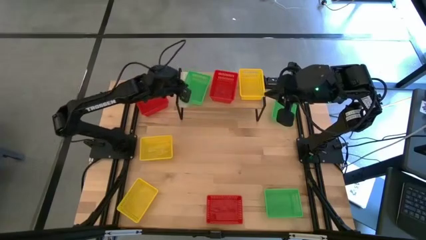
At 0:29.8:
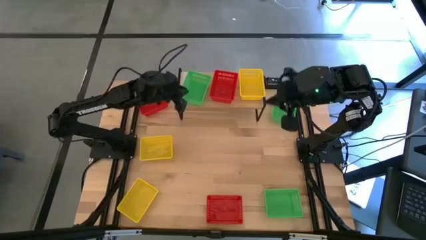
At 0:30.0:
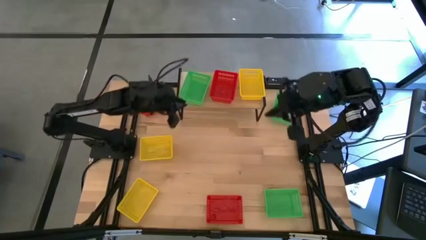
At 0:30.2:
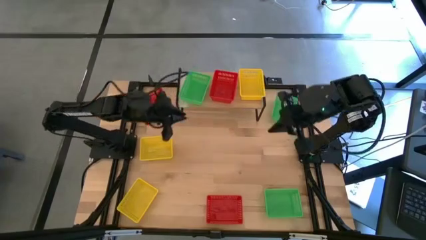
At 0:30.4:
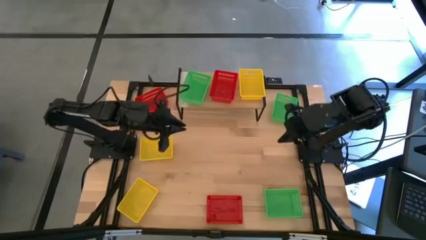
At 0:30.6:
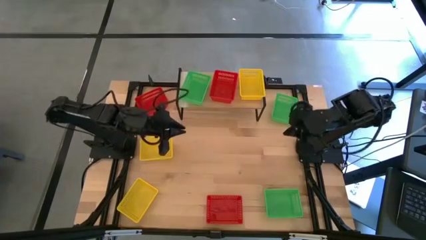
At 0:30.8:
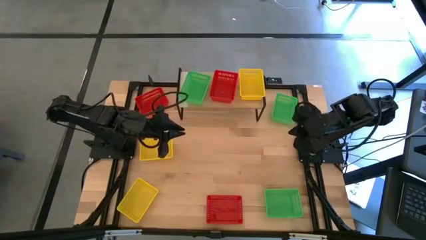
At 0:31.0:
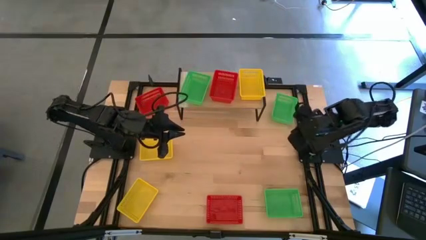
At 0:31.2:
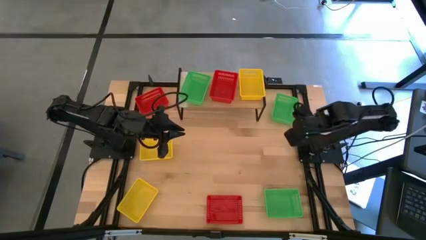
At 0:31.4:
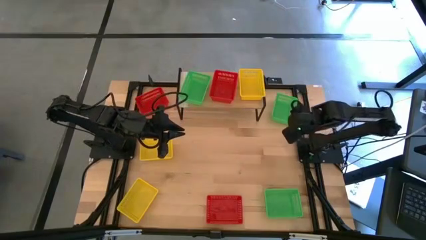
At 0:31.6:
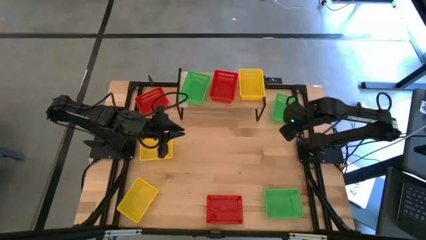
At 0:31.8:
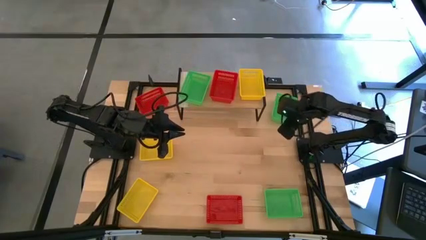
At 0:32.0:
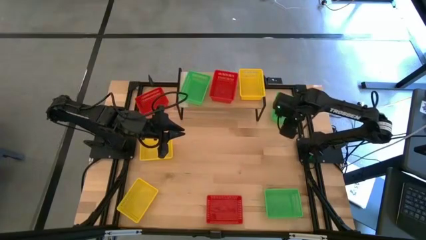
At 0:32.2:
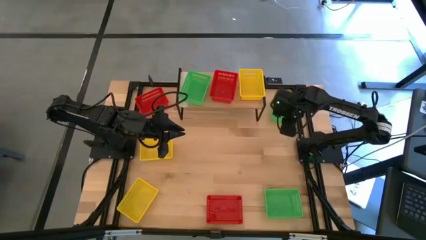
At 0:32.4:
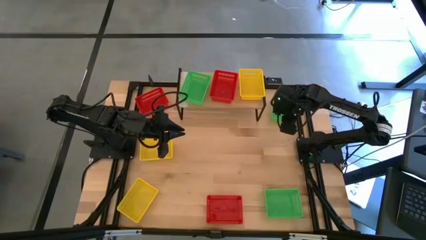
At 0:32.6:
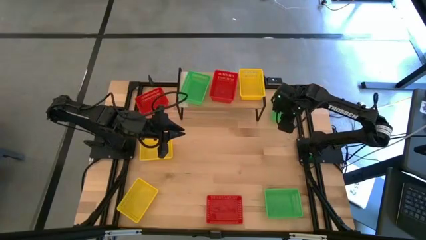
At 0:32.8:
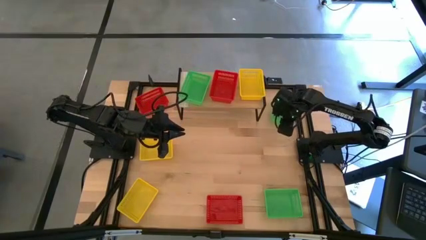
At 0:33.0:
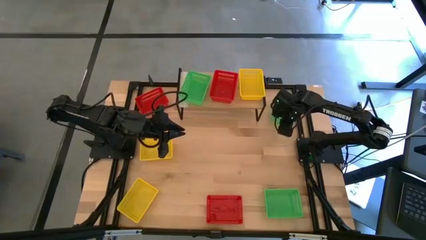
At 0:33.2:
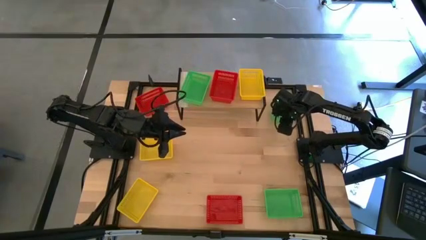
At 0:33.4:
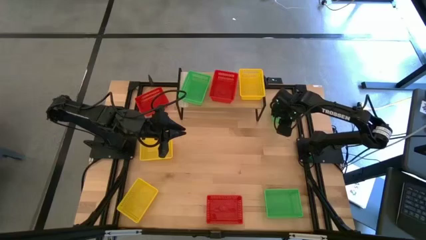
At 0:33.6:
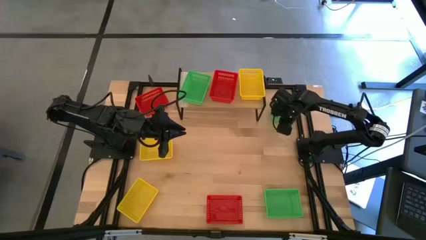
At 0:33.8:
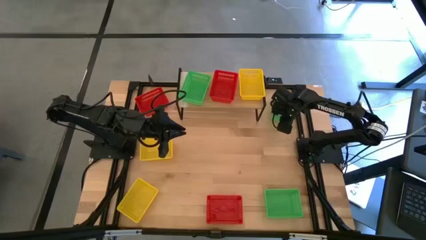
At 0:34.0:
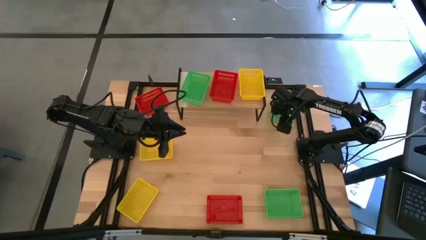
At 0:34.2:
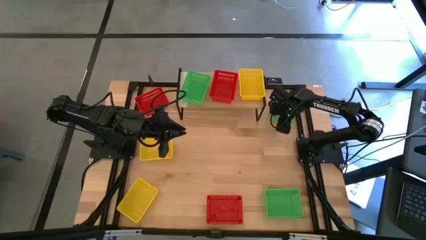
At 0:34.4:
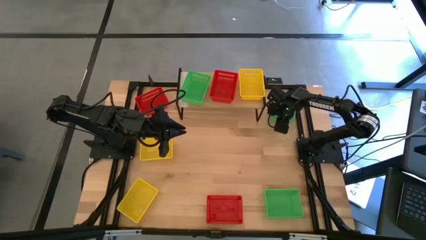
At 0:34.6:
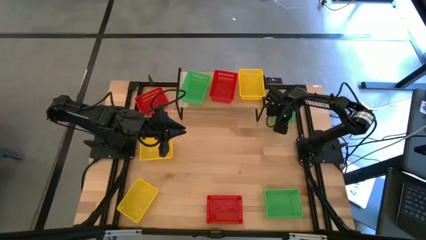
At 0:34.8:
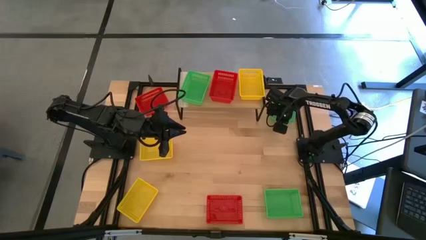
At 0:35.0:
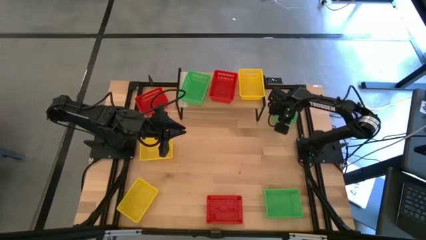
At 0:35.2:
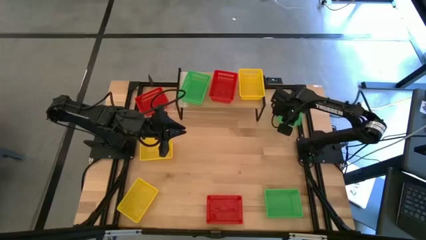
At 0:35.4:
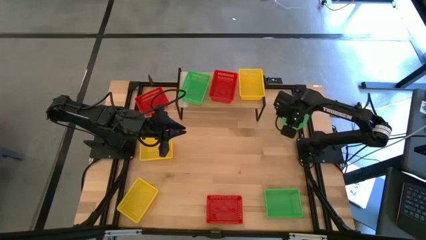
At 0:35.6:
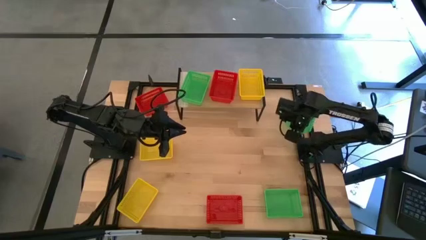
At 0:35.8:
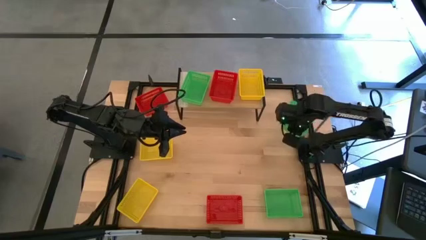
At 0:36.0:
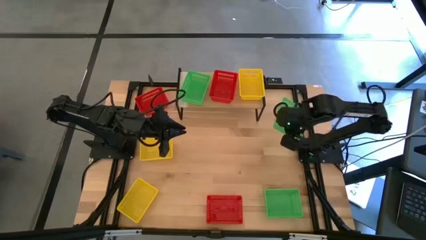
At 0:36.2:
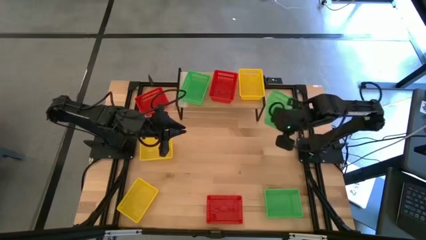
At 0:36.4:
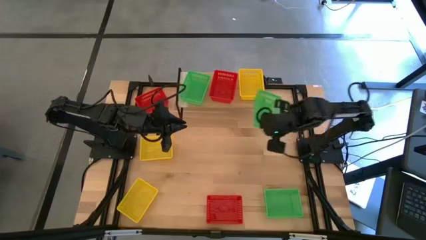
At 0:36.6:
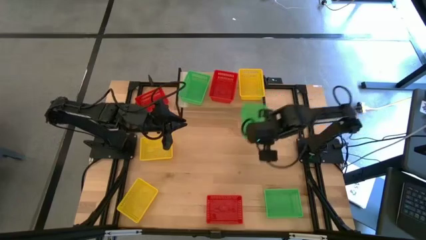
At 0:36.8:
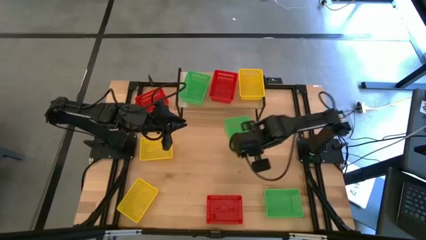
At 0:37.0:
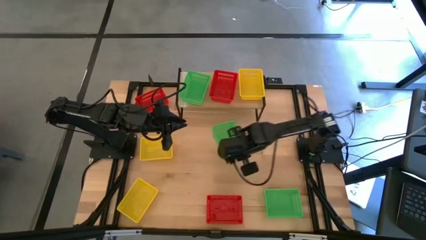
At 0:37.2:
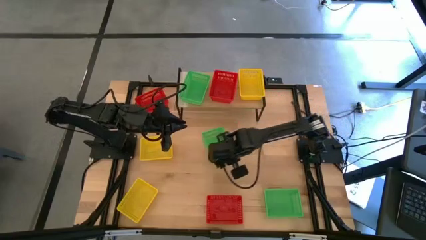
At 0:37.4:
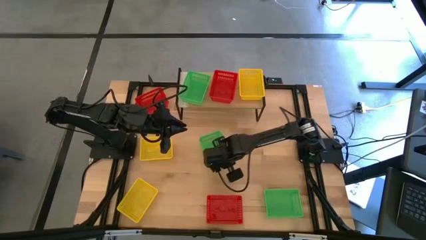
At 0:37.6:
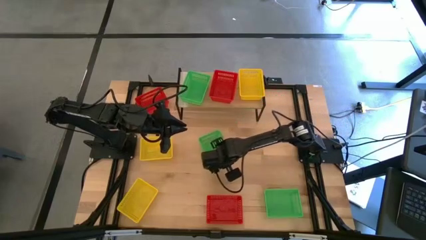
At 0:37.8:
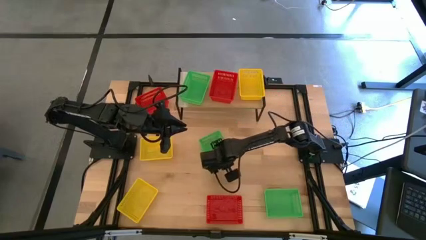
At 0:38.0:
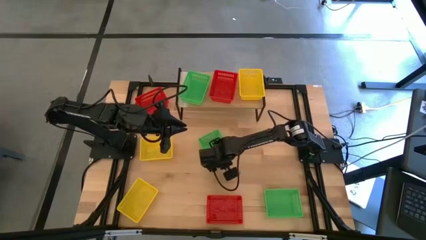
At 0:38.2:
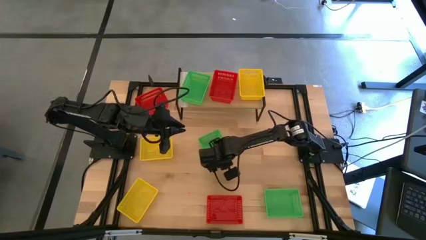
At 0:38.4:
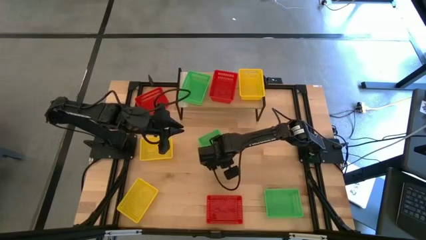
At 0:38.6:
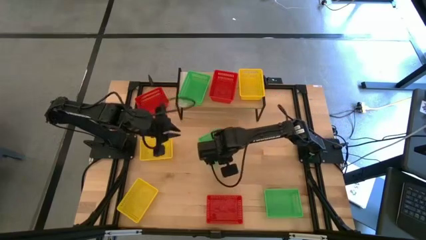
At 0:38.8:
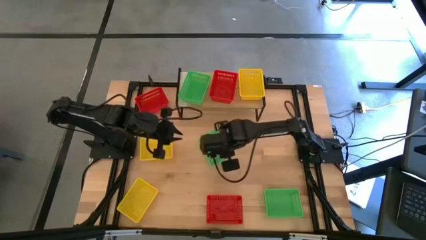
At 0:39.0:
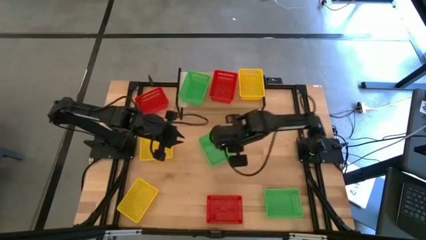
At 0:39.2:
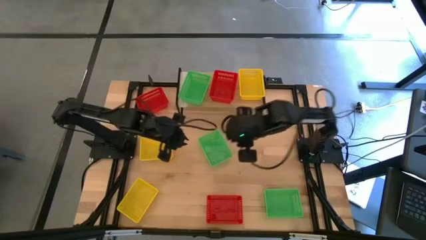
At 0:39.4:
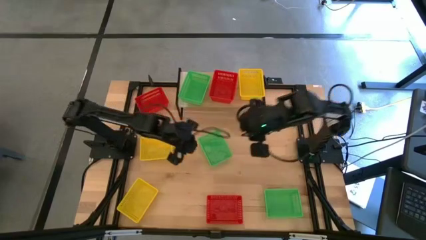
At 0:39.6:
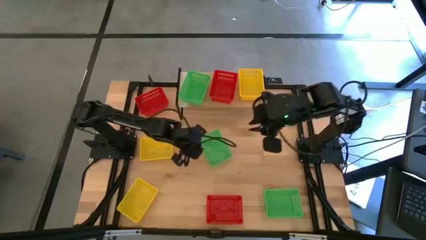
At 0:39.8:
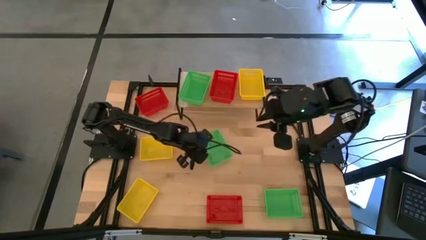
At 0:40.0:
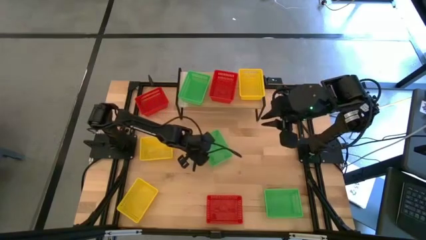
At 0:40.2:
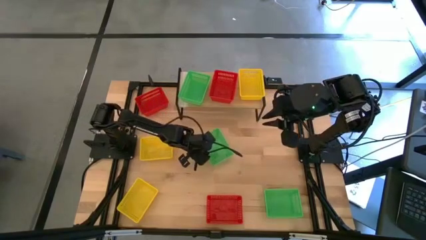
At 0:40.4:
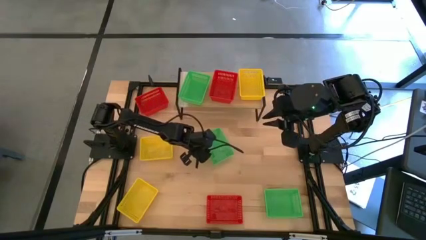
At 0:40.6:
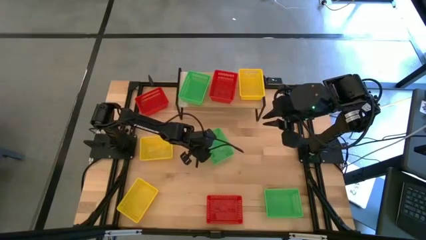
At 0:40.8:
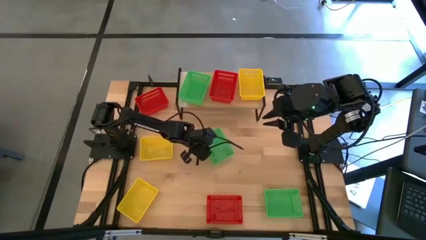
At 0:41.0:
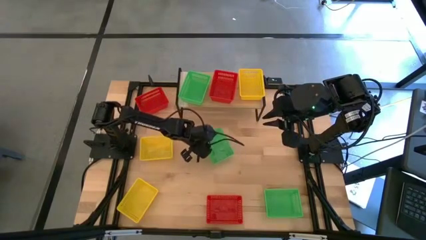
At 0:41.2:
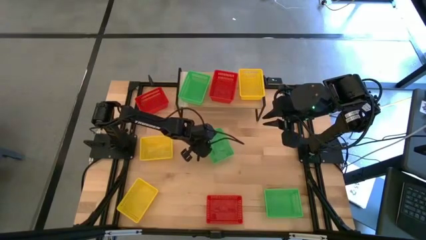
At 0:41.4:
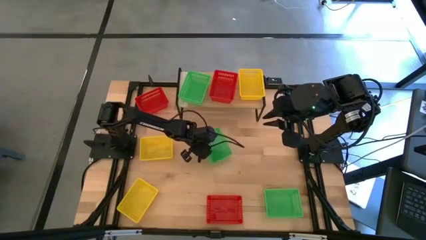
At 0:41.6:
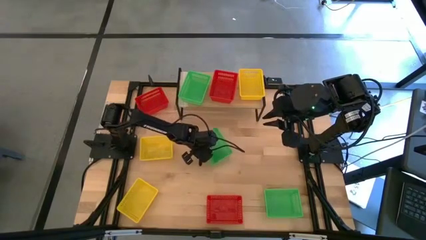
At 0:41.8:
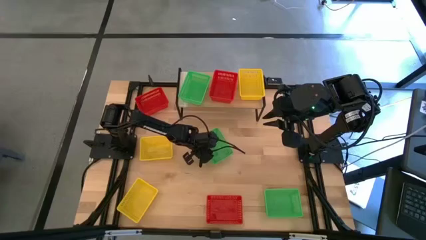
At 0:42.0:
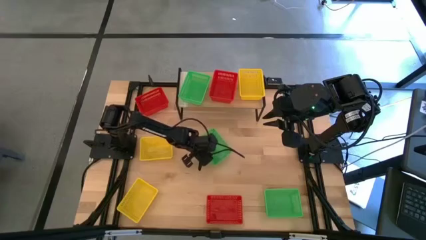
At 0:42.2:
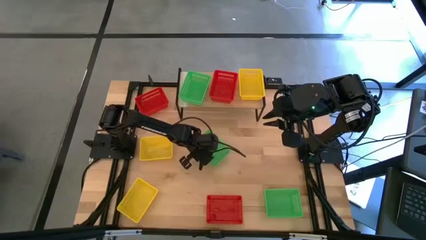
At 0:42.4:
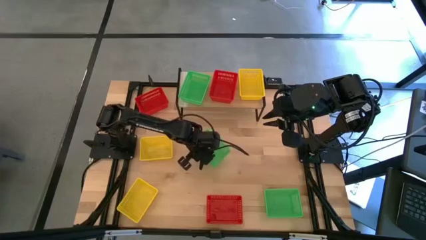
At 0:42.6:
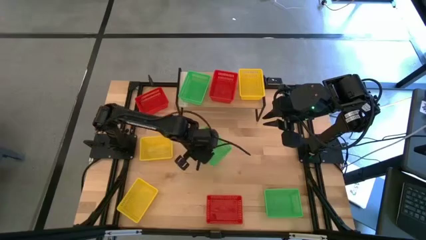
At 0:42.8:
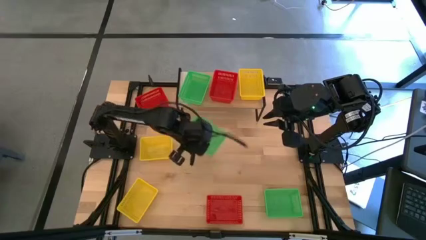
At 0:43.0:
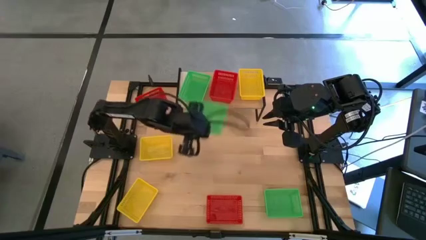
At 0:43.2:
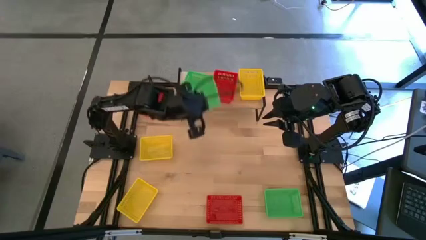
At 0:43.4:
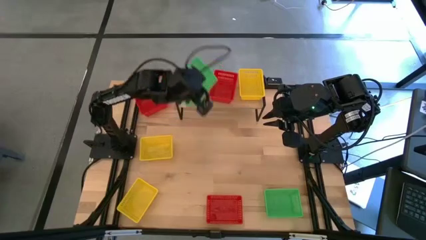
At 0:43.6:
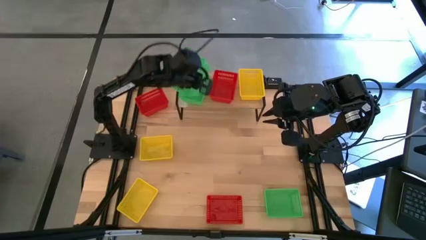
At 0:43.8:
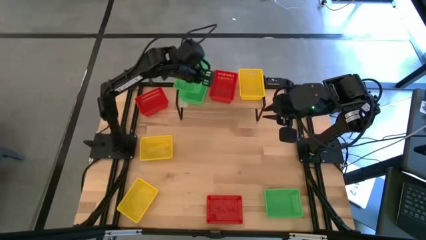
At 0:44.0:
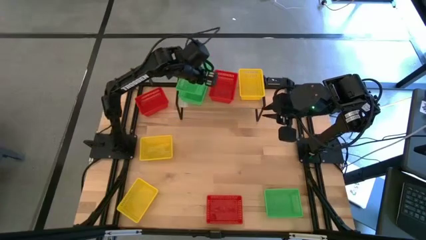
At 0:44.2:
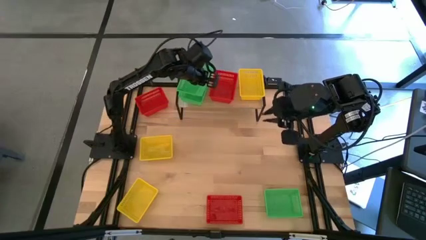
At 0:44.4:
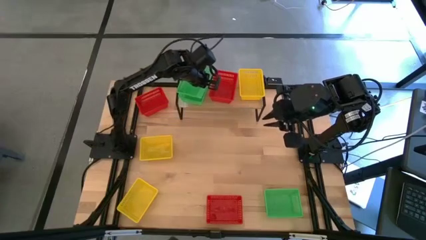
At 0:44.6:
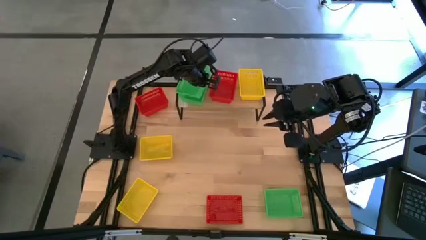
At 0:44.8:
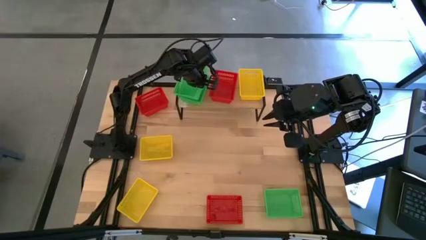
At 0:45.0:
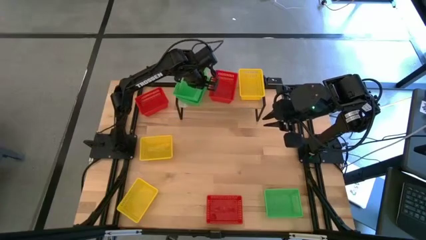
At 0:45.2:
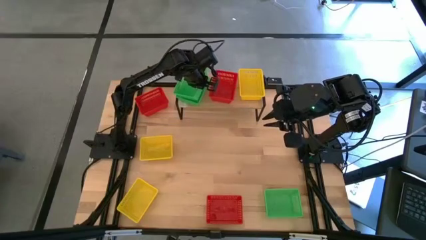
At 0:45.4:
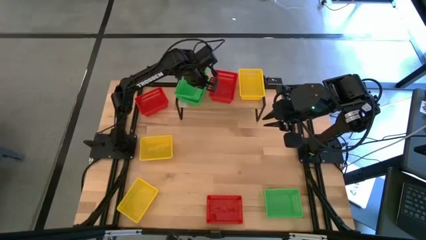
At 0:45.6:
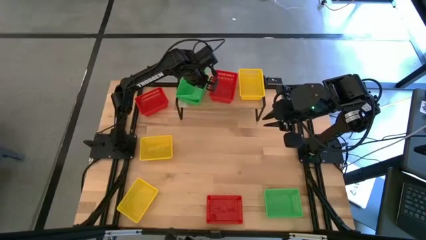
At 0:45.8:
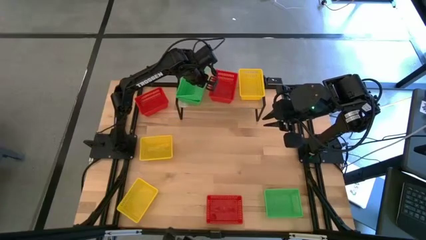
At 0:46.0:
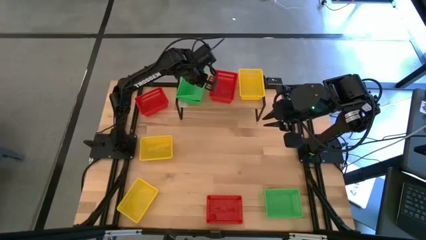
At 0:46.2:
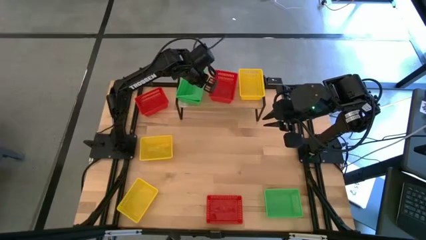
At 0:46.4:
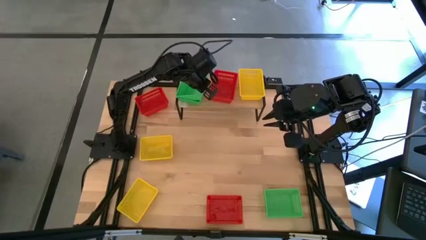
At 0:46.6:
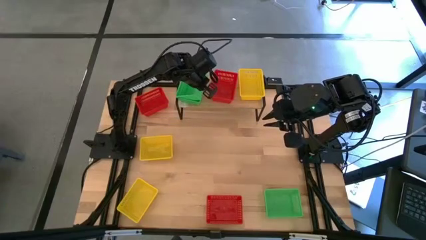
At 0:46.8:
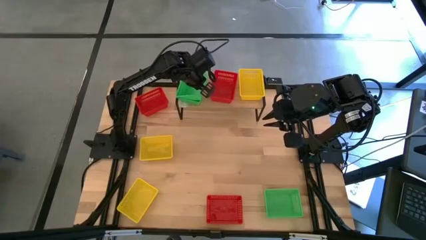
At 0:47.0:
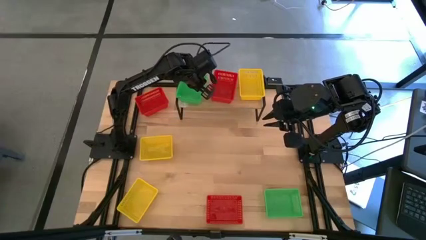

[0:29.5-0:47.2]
Task: Stack baskets on shelf by color
Stack the top green bin on top of the green bin on the shelf
